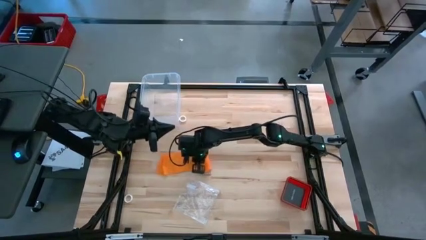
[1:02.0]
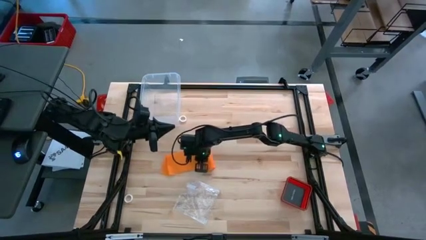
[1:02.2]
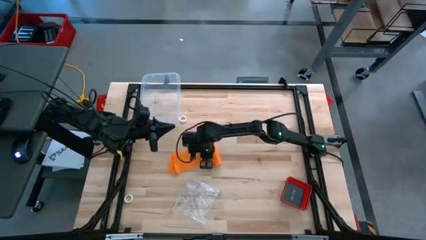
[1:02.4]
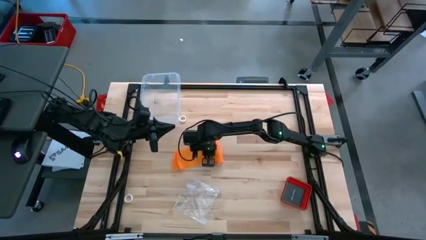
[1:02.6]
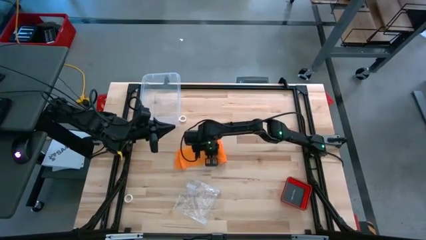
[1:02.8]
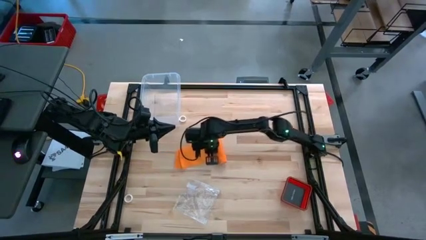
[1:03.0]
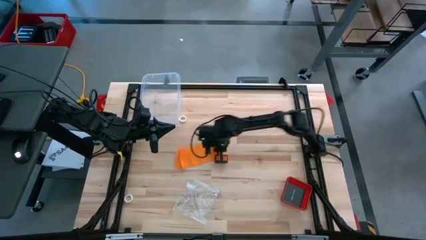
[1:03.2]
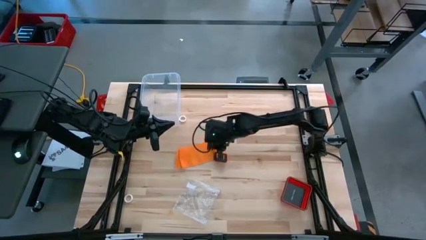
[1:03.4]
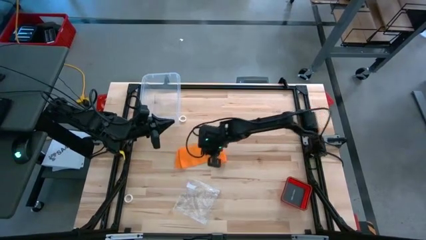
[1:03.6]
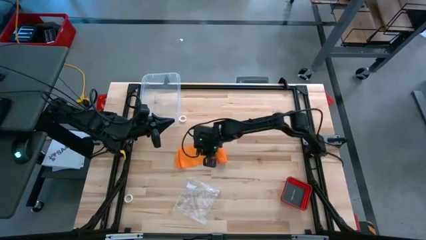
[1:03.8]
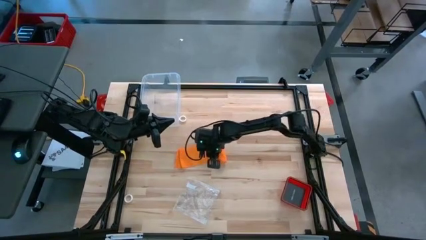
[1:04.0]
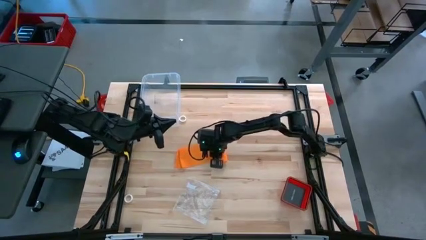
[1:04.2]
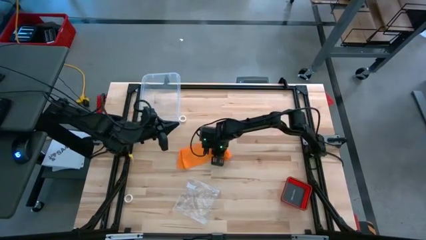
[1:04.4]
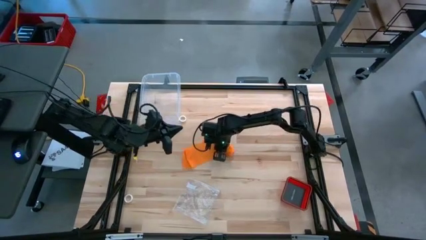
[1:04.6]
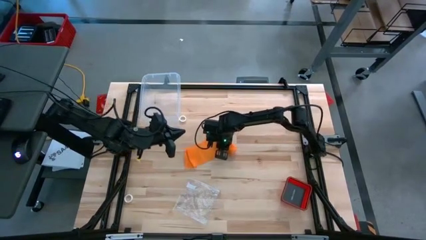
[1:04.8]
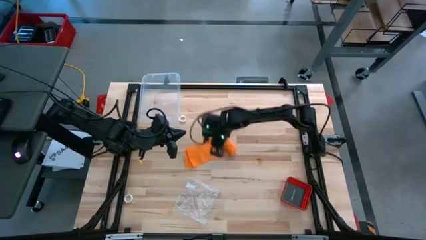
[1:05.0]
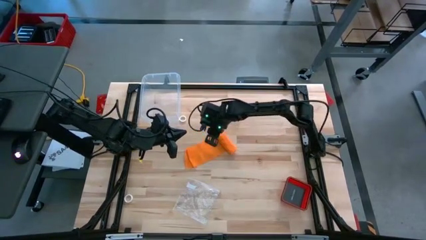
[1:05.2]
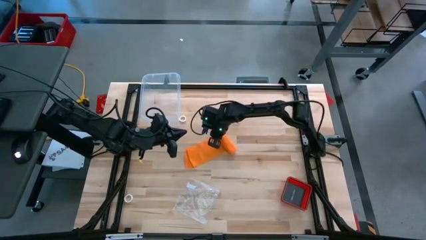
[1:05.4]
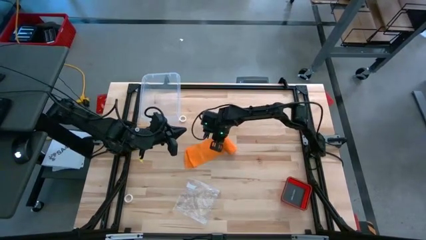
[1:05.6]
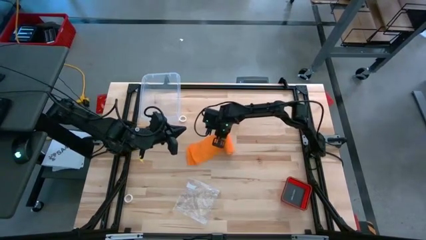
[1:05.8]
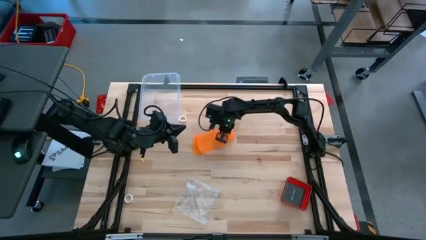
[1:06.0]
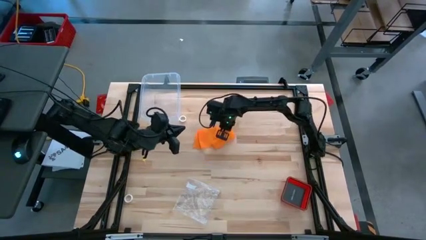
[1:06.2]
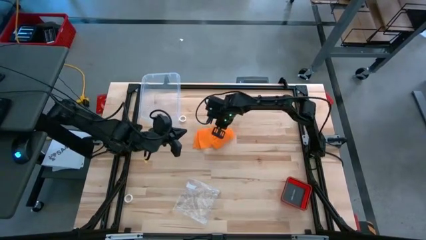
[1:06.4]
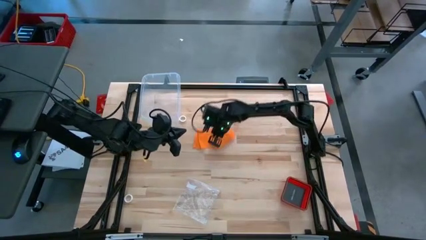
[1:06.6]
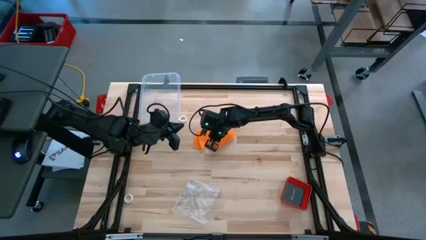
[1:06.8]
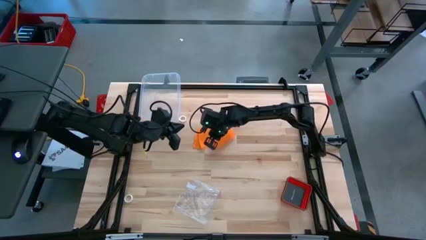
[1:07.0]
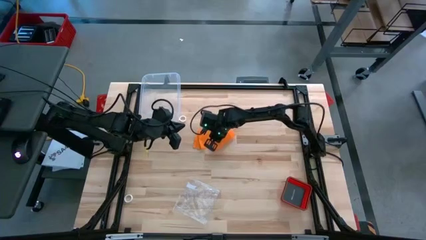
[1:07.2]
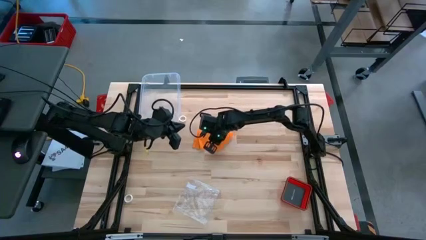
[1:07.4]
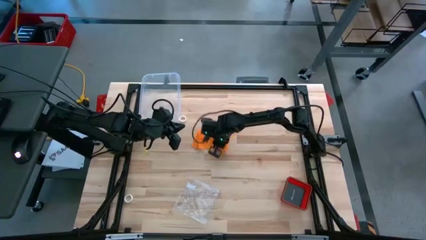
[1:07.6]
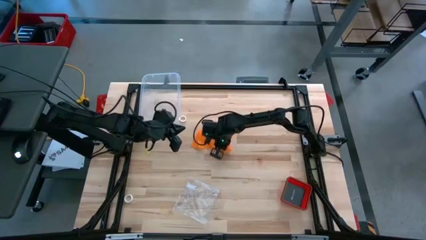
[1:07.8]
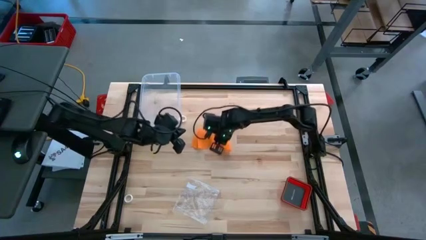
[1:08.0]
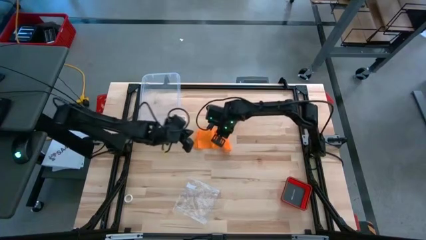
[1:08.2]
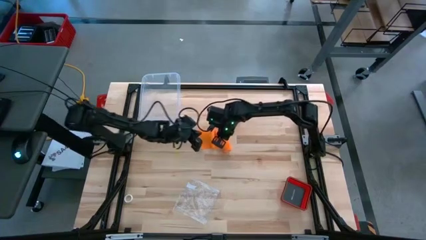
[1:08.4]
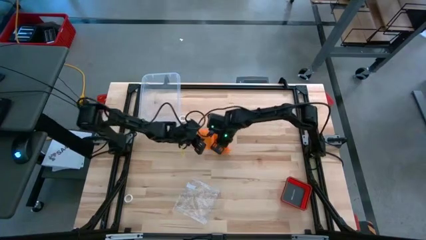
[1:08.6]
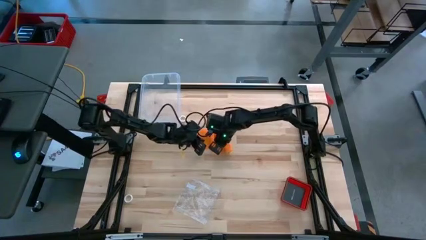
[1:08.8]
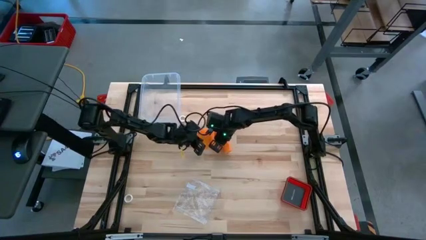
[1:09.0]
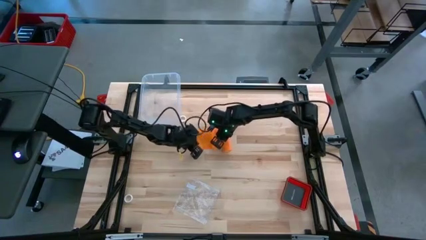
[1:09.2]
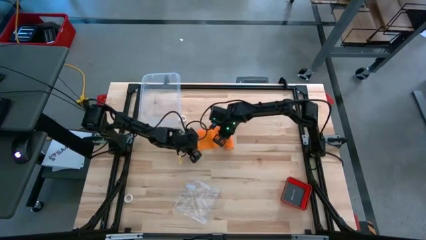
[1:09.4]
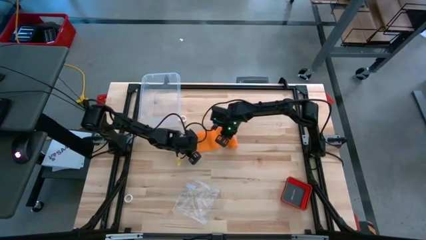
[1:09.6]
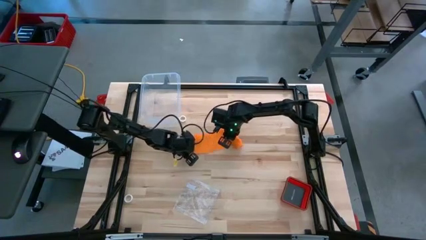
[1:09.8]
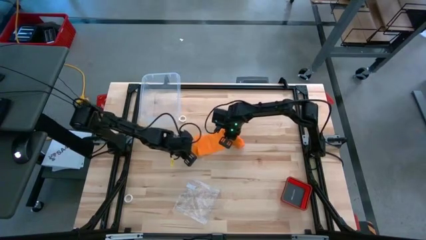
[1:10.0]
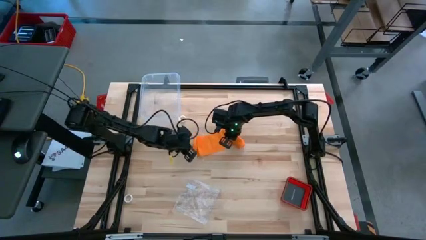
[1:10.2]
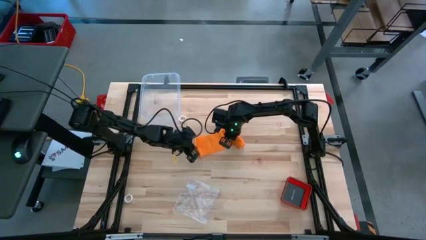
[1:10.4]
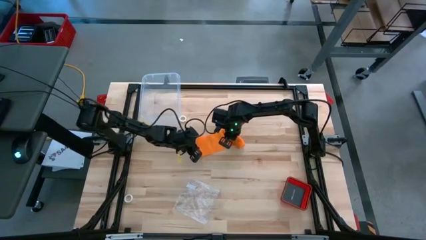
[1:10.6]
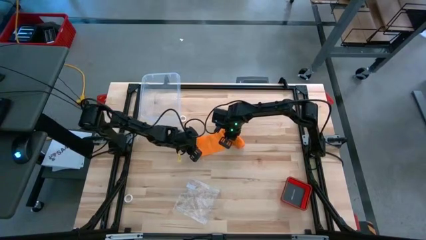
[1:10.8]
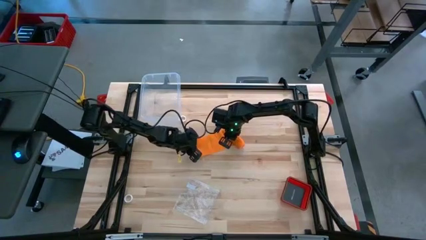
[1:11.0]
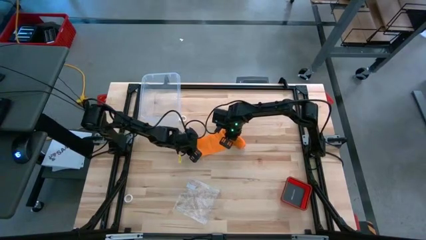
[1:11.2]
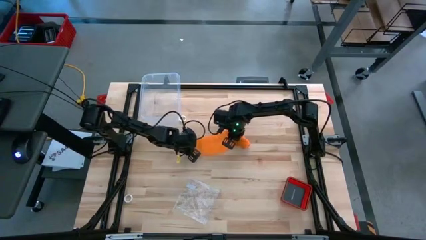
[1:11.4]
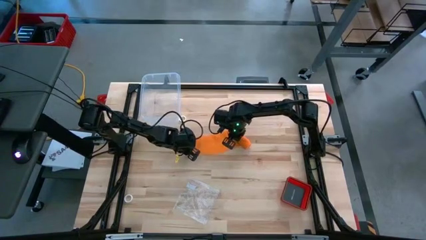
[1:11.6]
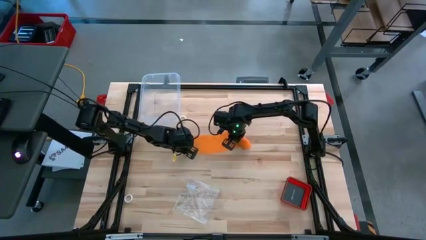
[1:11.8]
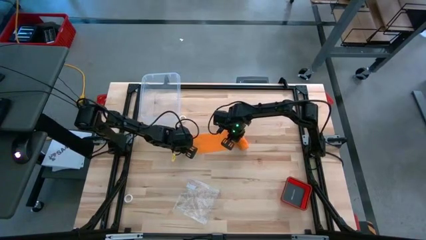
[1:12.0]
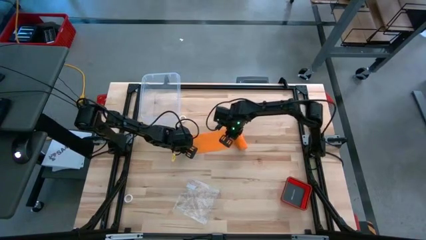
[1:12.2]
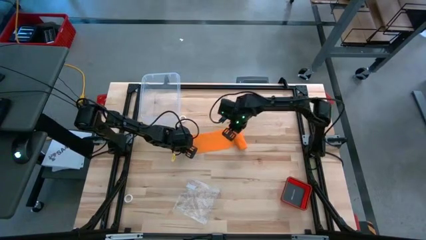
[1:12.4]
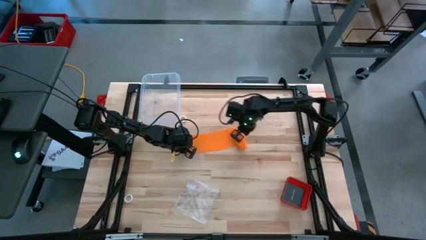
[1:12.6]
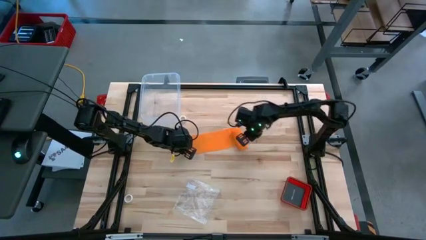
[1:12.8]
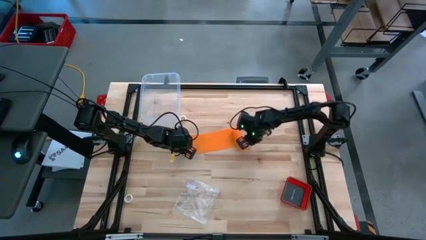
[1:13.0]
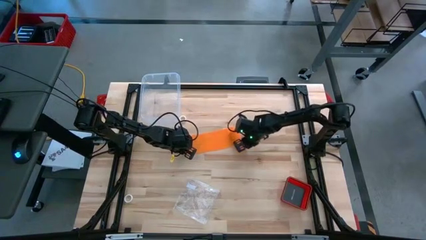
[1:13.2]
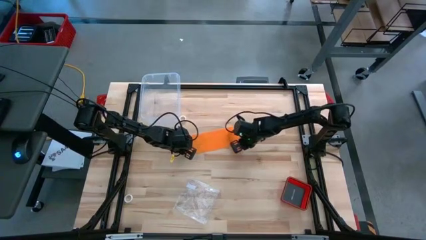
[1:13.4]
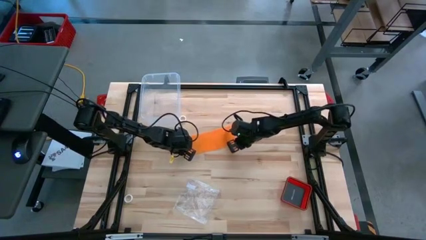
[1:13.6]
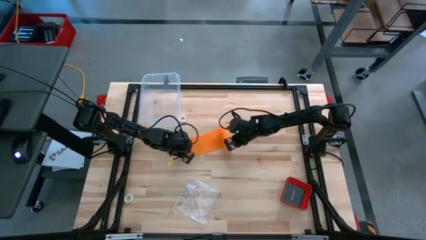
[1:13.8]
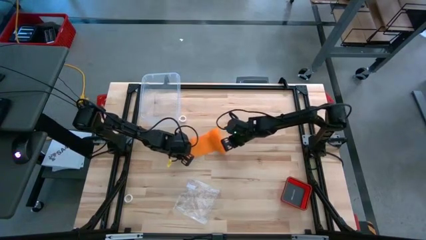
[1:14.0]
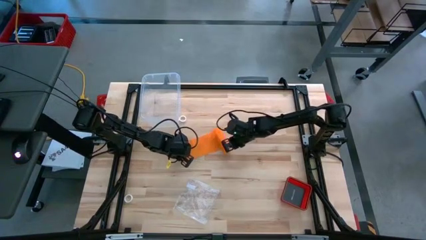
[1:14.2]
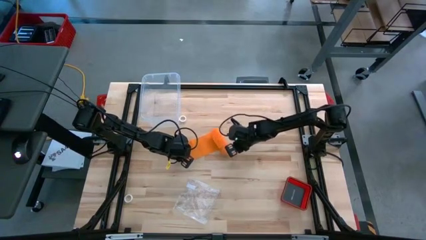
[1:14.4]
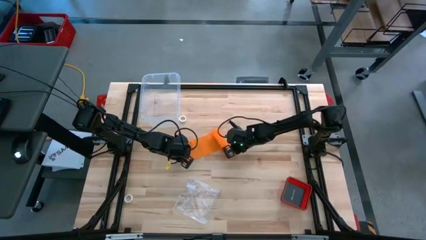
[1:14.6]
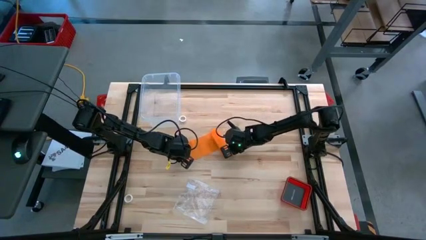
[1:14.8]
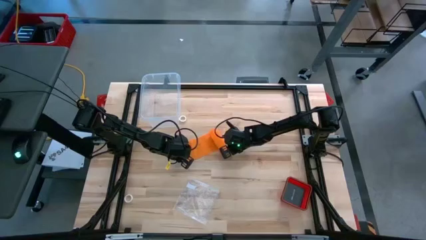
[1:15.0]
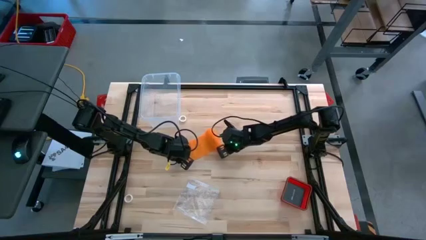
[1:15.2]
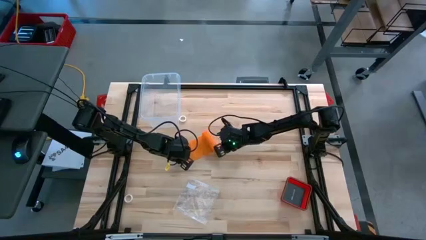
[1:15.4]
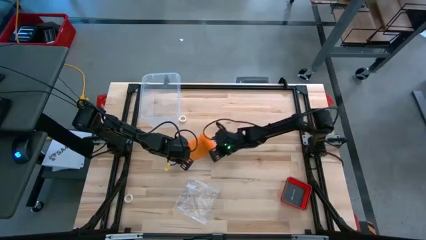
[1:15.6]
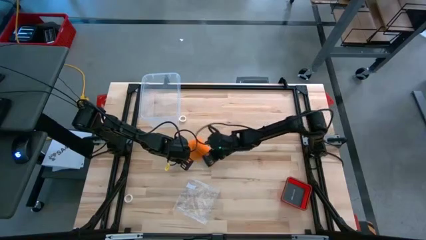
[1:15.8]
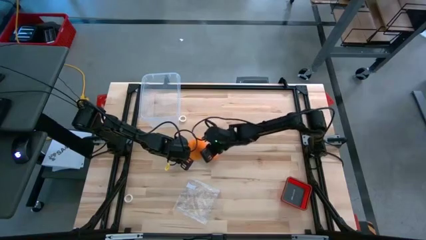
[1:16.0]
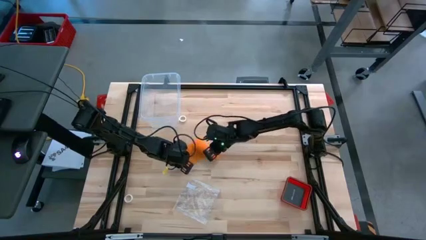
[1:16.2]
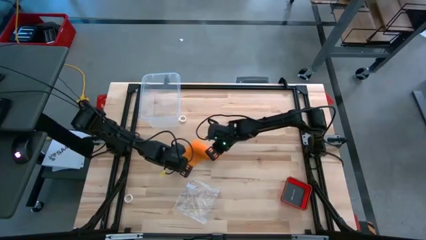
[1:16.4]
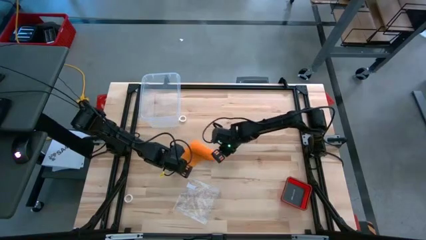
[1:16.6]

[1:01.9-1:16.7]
Task: Roll bandage
Roll the orange bandage

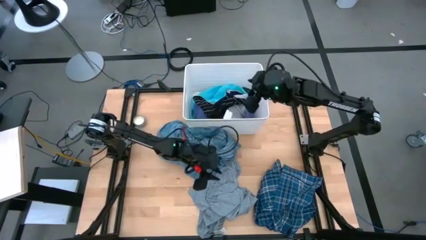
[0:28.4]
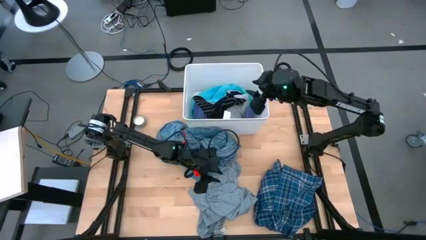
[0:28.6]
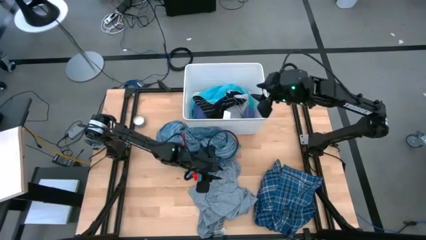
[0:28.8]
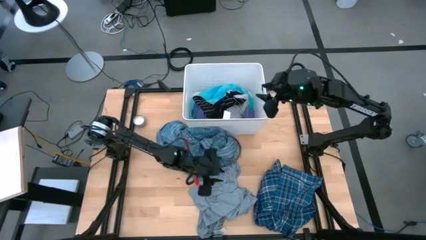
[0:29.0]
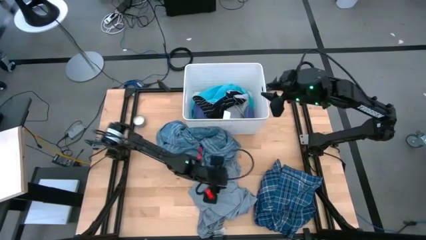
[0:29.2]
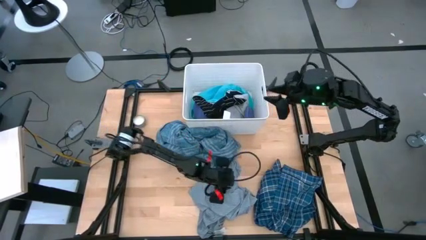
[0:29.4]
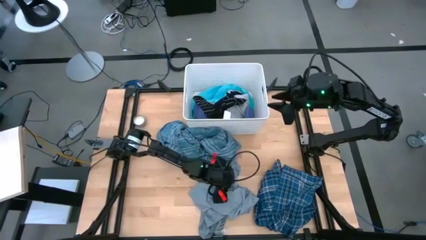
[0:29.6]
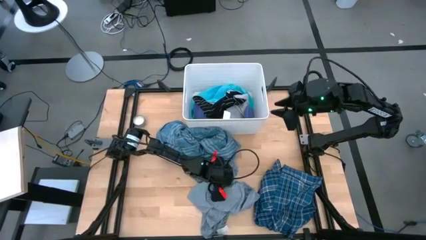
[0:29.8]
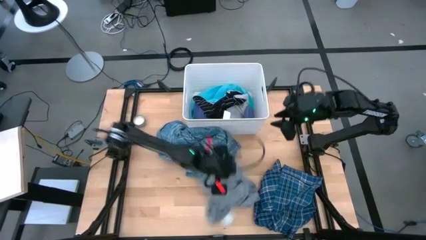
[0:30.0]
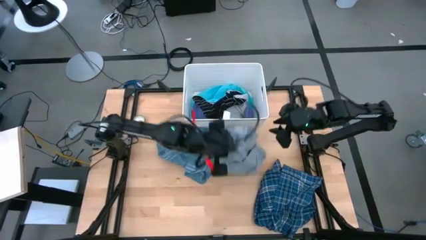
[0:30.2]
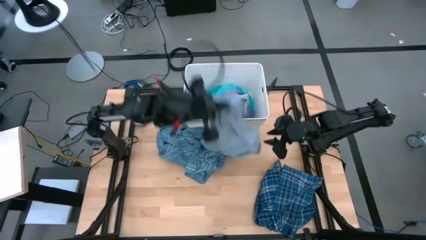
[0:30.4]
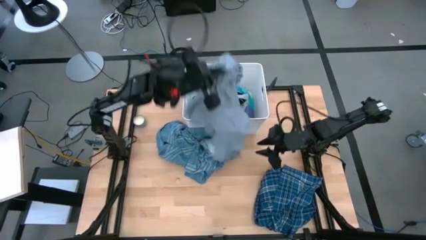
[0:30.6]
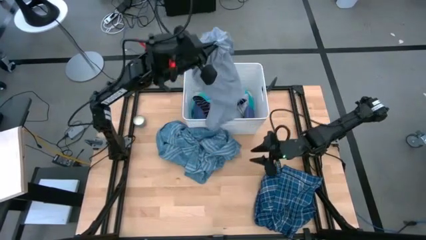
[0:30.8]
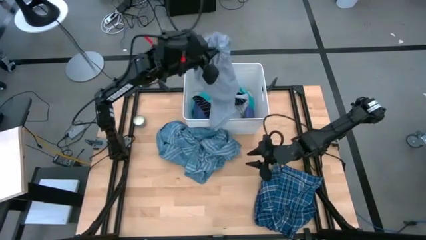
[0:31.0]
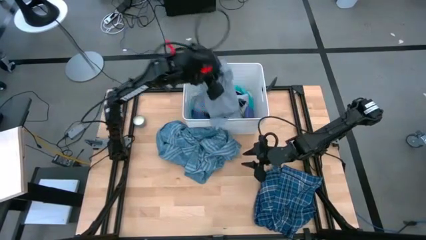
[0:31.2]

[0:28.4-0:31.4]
Task: Sort clothes
Put the gray shirt into the white laundry organizer
